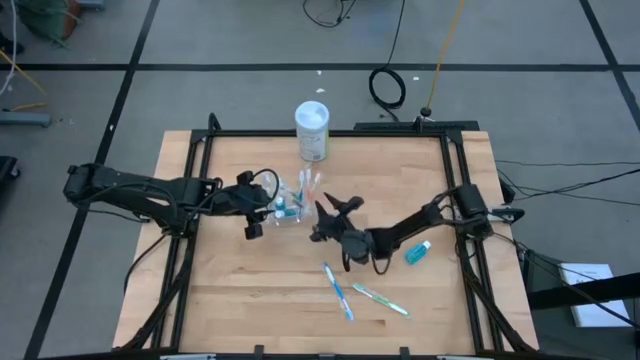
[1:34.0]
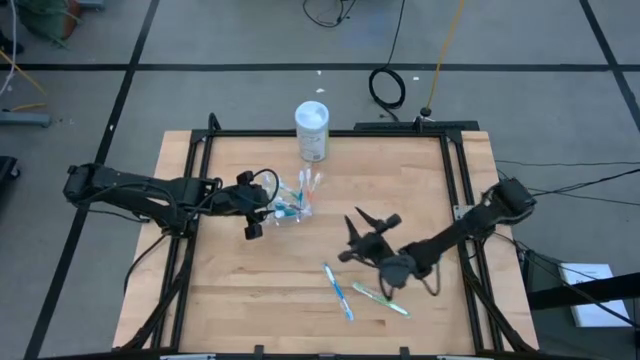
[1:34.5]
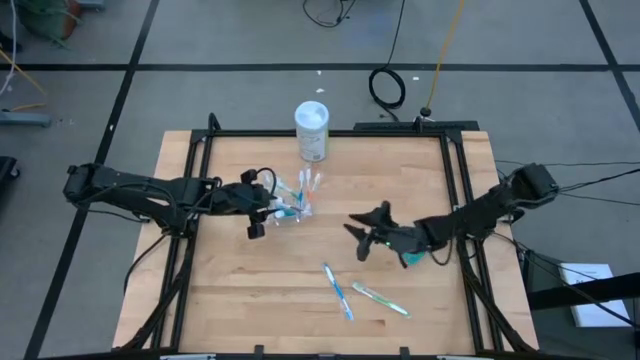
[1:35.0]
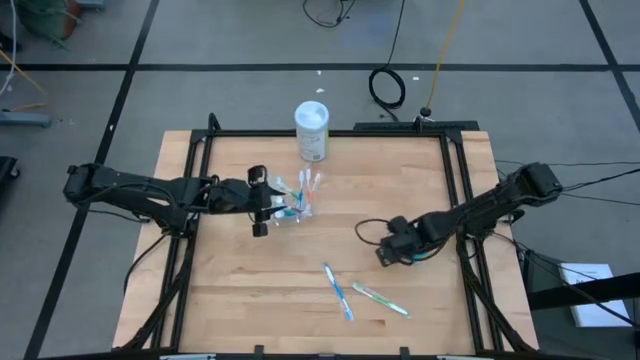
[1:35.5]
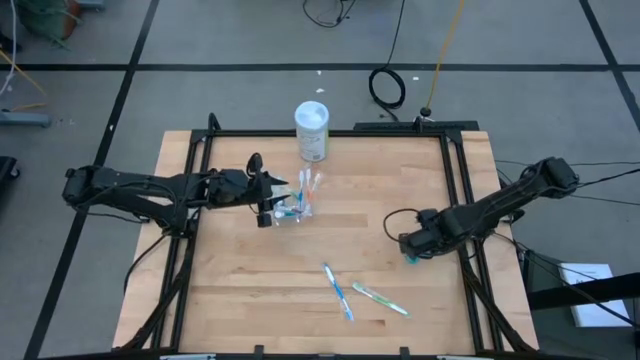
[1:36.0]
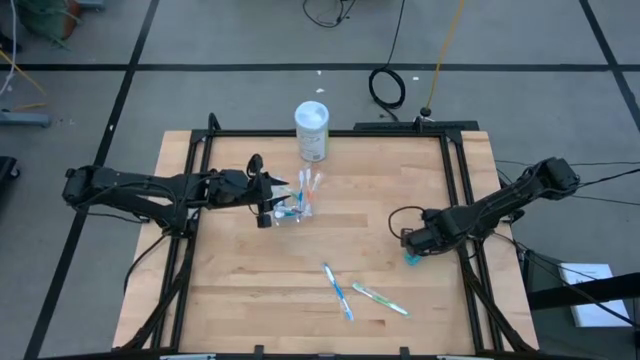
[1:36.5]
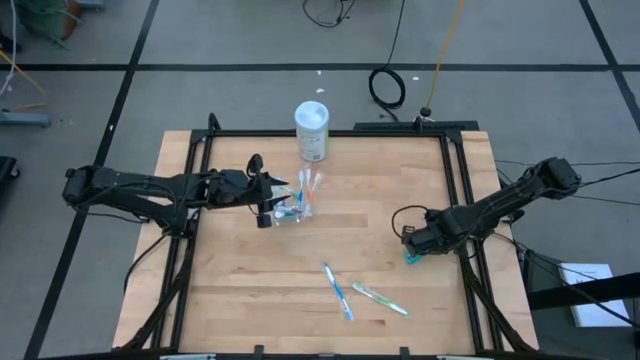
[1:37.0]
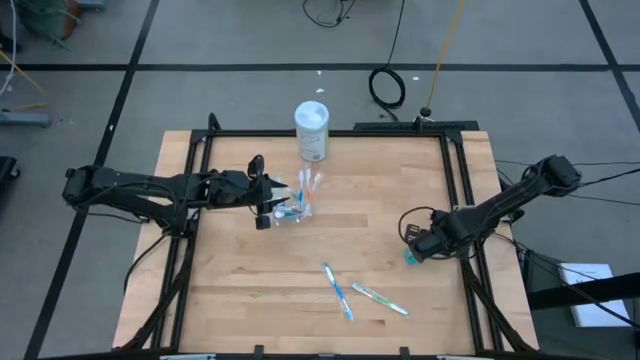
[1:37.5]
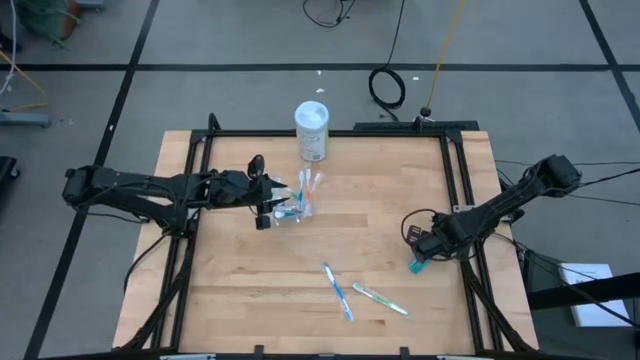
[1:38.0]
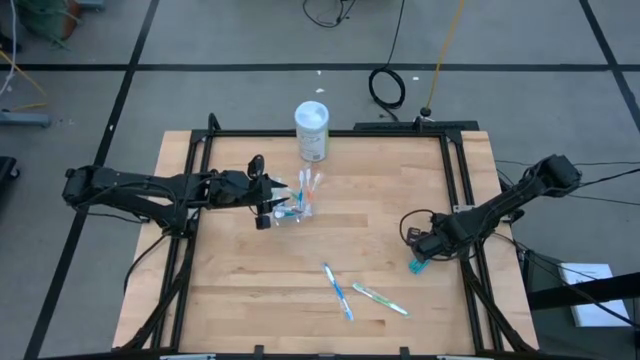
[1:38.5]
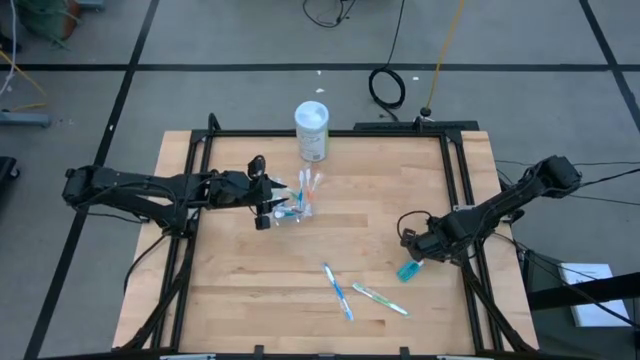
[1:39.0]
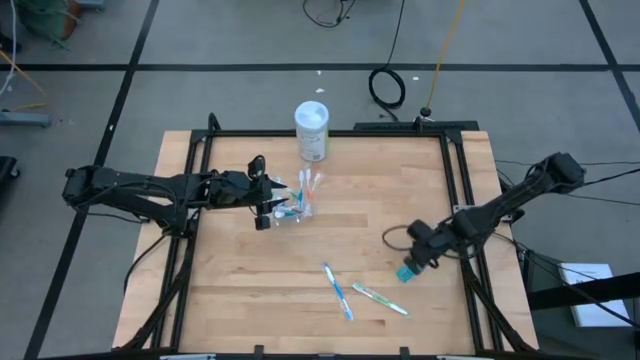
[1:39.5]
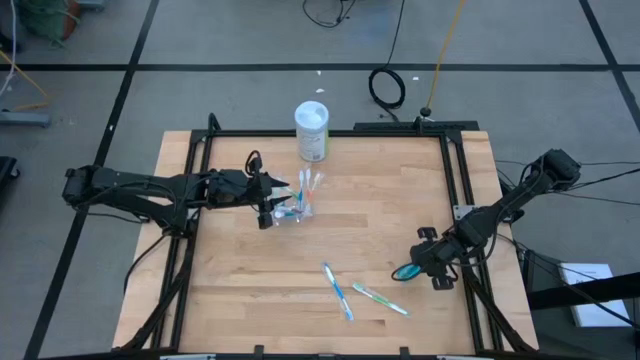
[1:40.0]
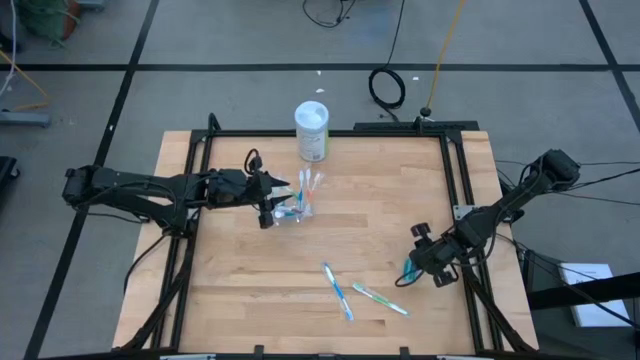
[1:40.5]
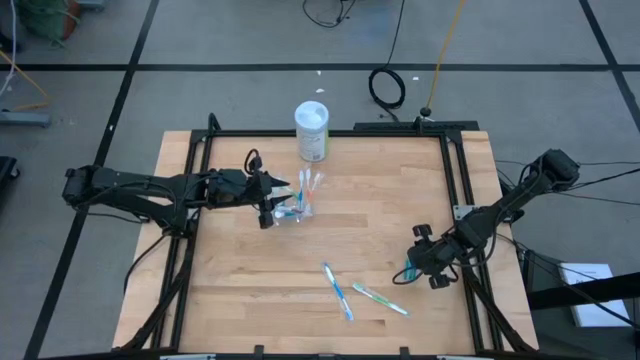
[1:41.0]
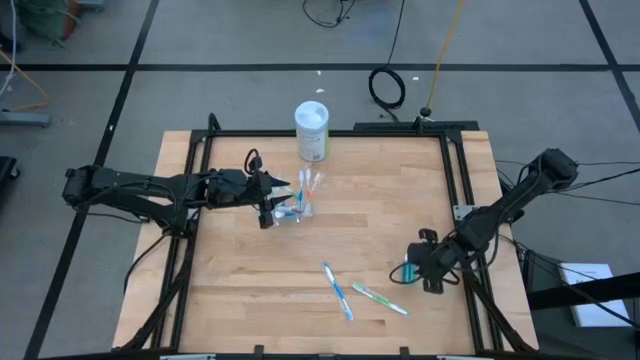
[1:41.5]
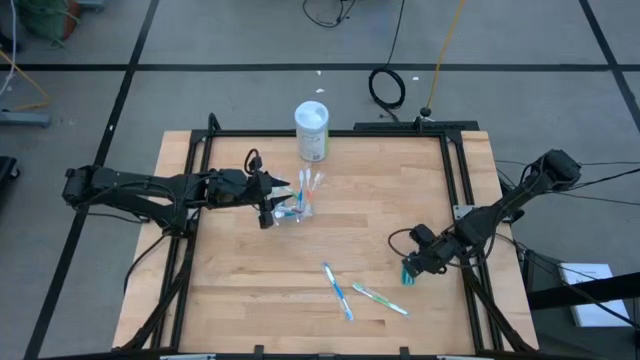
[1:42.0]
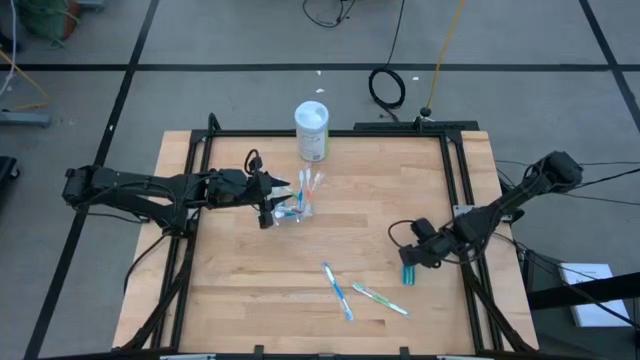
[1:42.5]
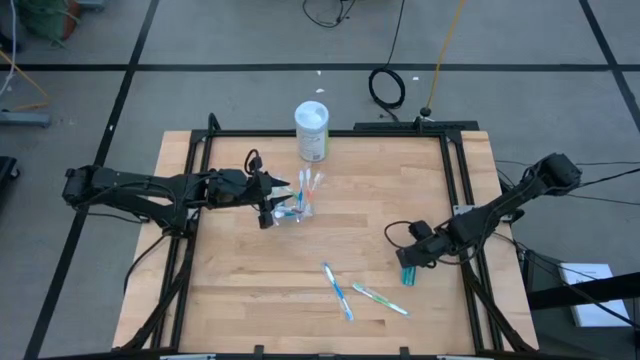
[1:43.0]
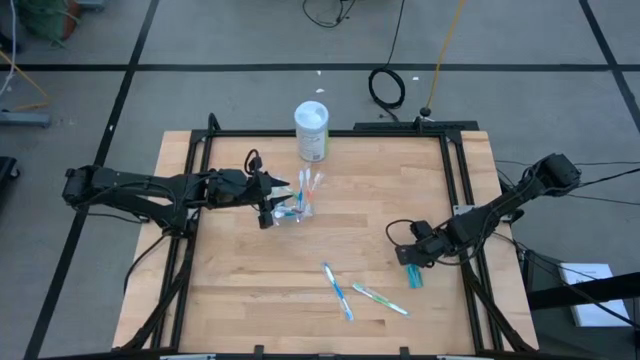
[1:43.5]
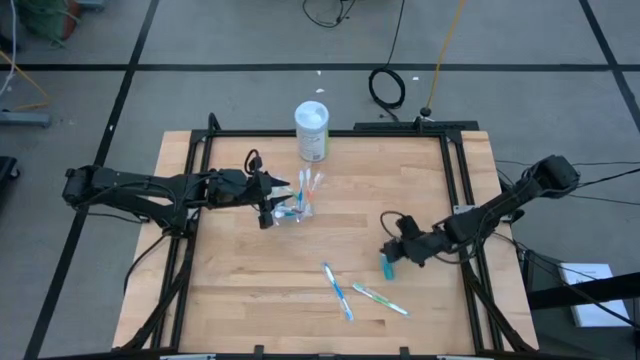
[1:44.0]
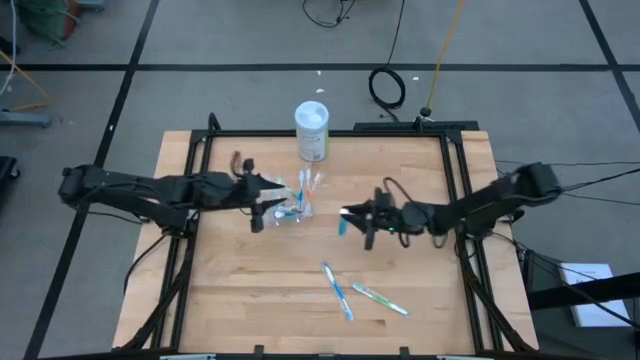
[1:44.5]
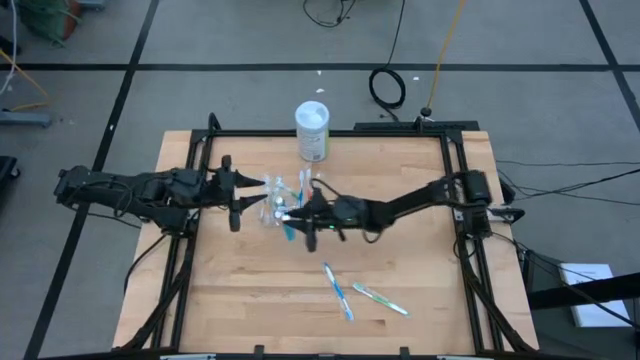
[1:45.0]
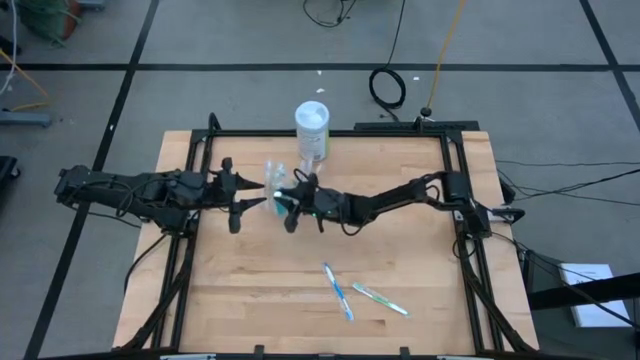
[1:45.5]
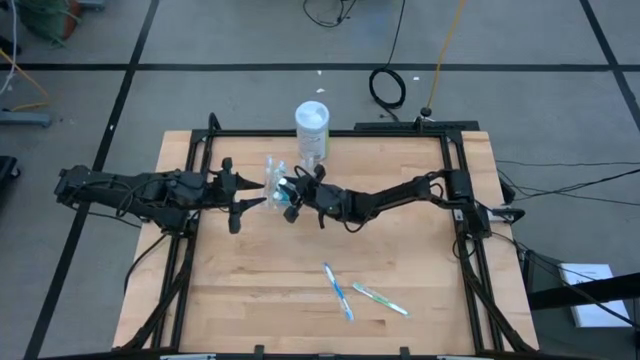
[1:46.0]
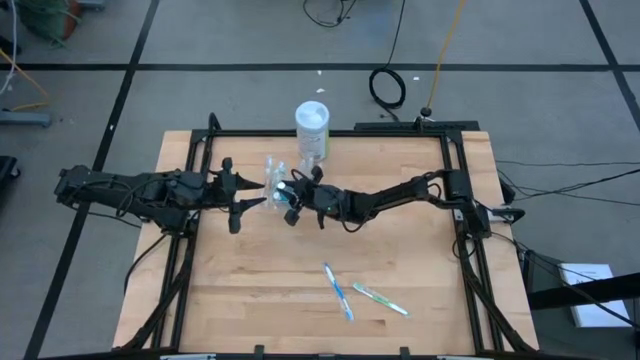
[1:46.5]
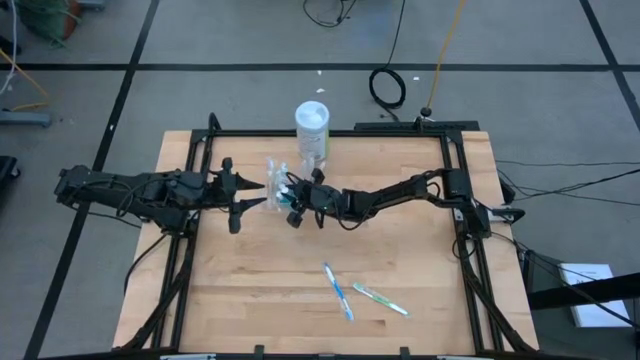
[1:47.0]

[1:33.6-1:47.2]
Task: Pick & Place toothbrushing station
Put the mouthwash into the transparent organizer

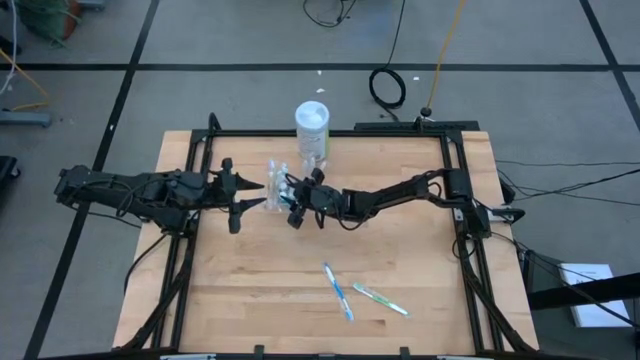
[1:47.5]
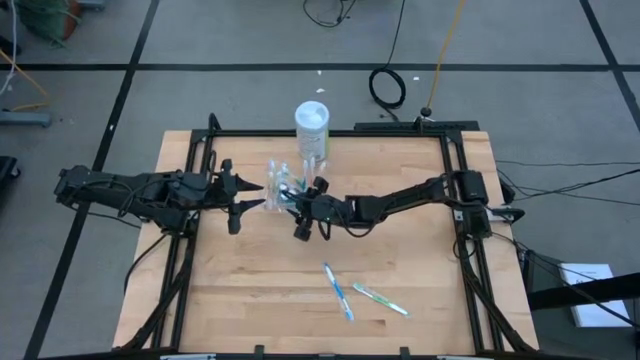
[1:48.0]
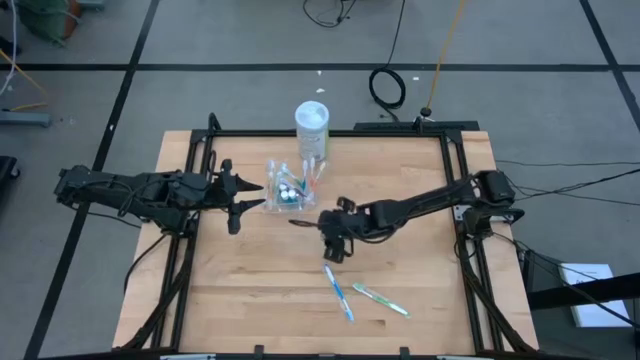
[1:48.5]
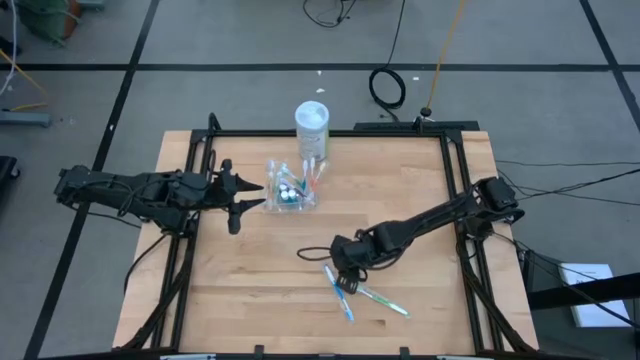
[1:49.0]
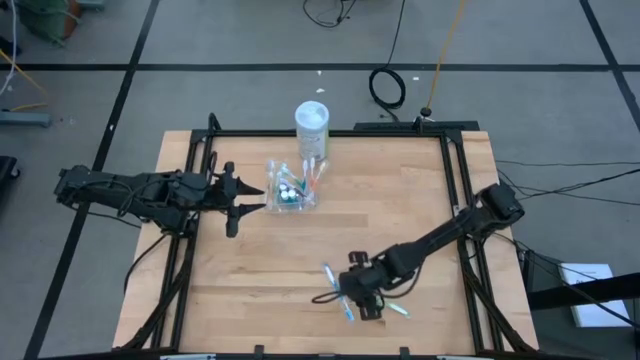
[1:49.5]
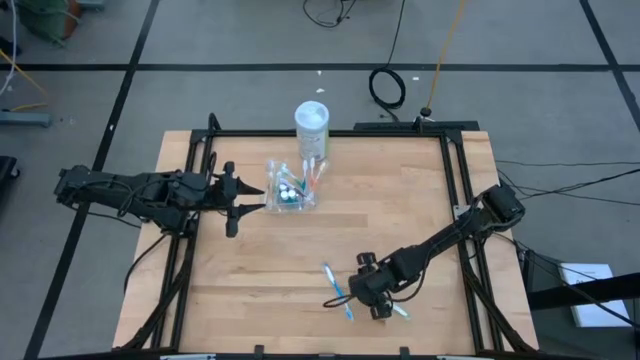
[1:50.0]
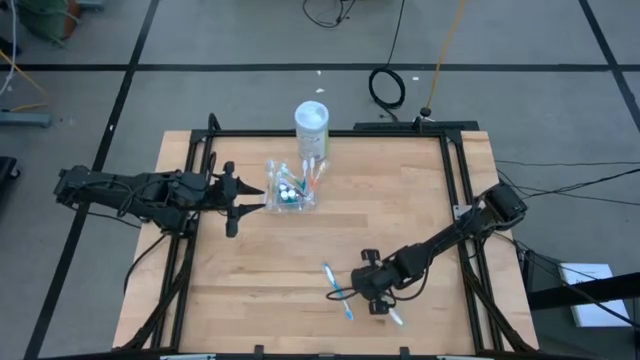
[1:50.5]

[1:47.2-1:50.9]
Put the green toothbrush into the transparent organizer

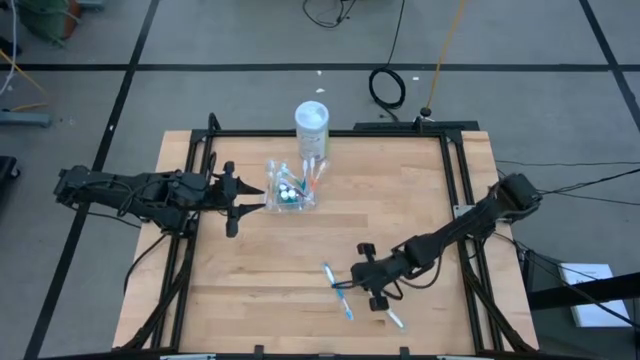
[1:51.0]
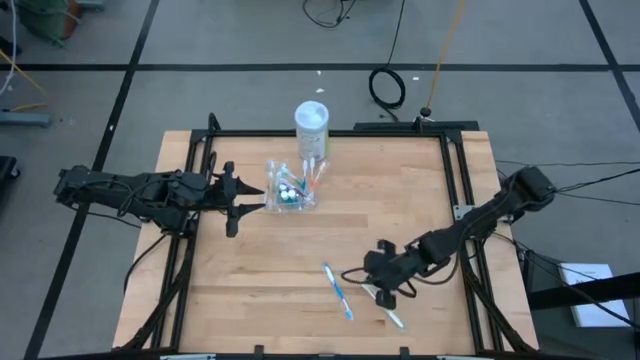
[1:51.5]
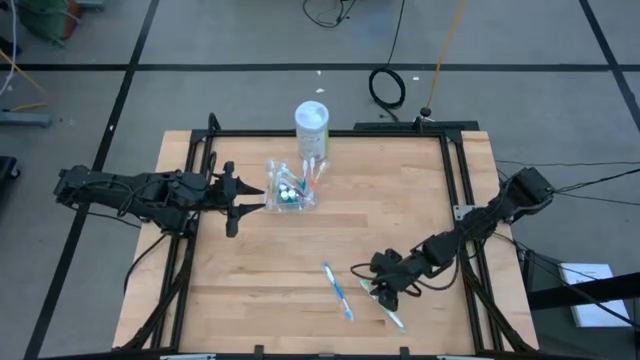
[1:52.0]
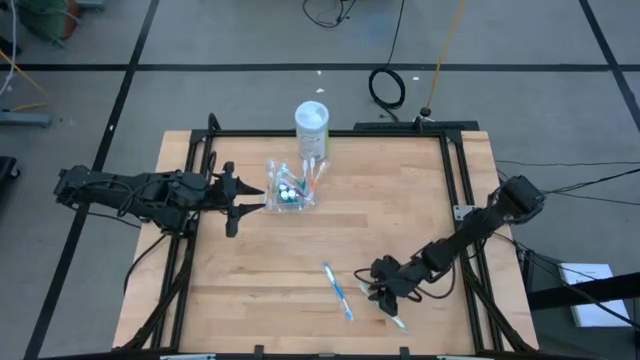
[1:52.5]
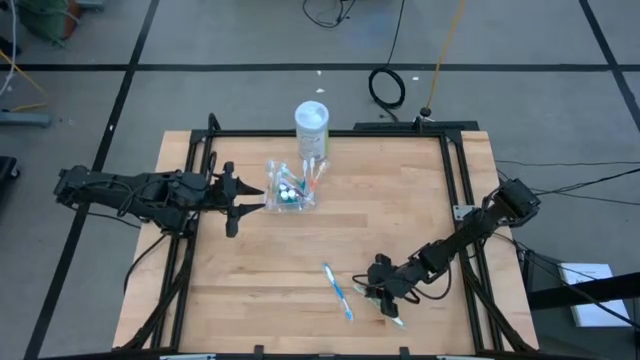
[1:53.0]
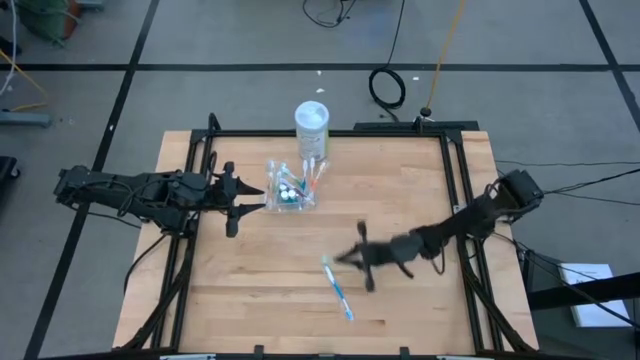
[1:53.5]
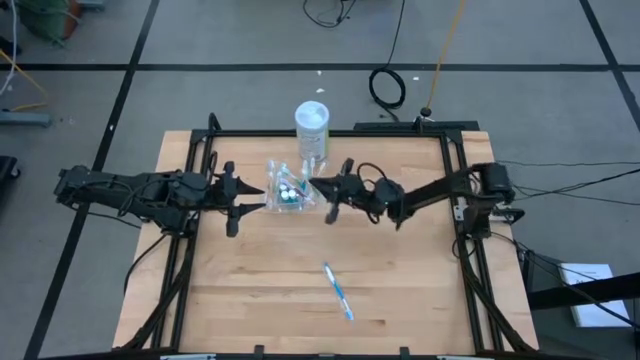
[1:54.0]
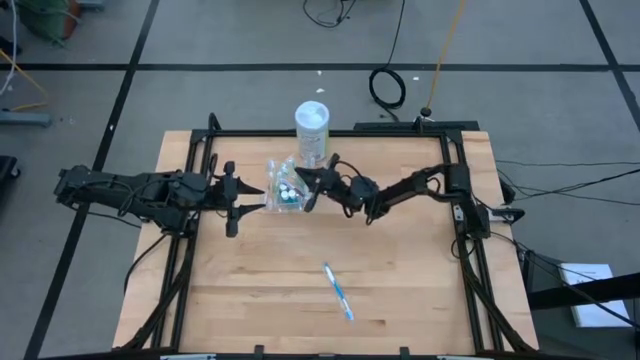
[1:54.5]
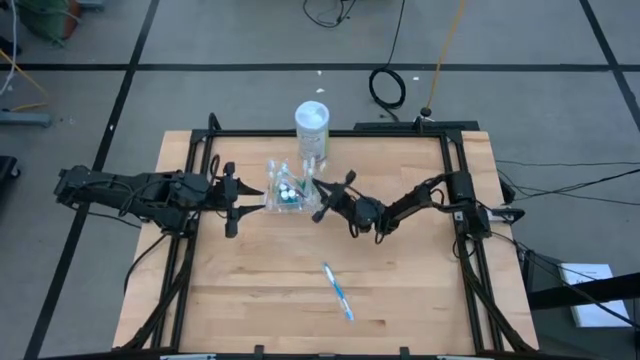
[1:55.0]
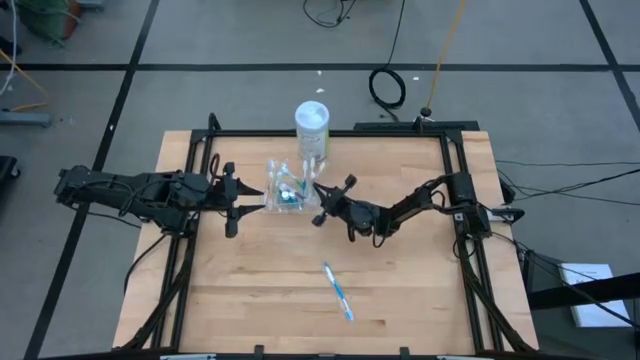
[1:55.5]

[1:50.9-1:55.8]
Put the green toothbrush into the transparent organizer

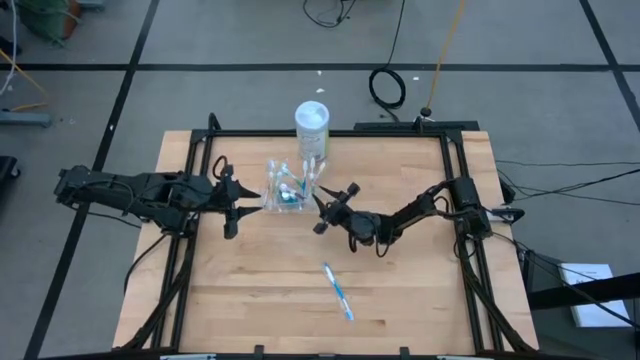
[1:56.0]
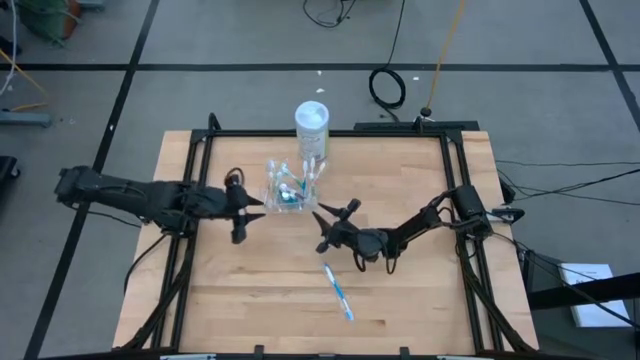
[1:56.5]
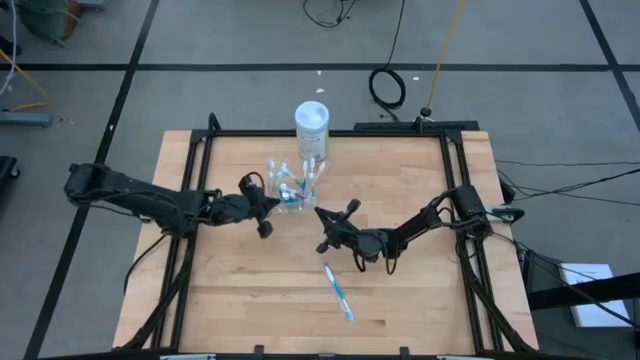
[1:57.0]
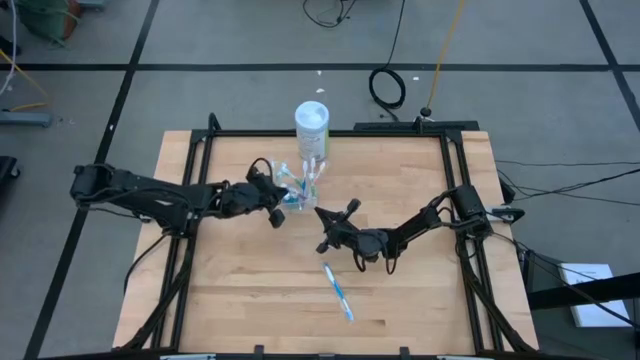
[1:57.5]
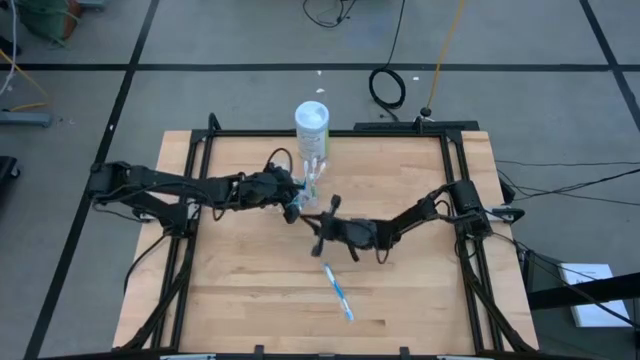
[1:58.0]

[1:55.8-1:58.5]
Adjust the violet toothbrush in the transparent organizer
